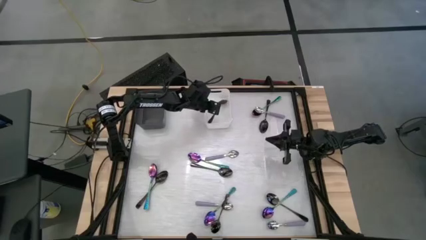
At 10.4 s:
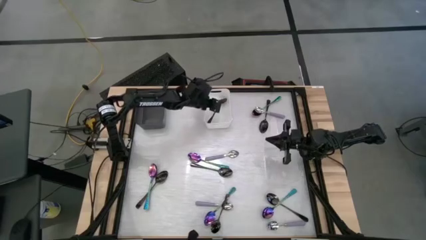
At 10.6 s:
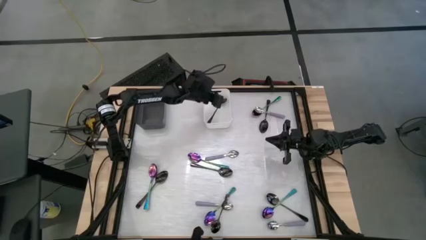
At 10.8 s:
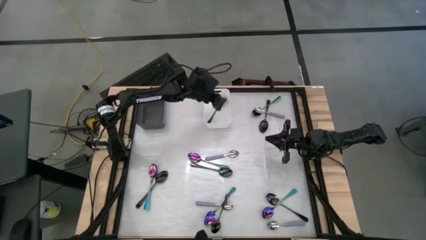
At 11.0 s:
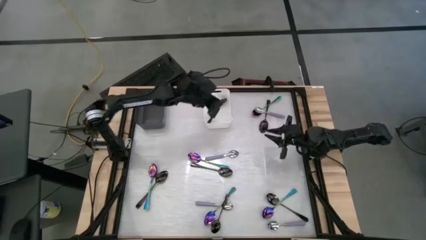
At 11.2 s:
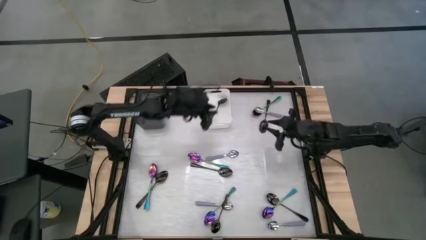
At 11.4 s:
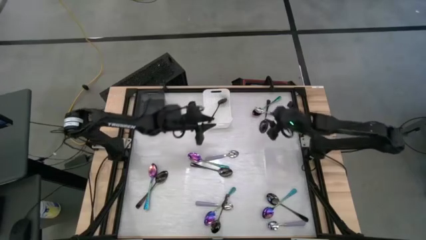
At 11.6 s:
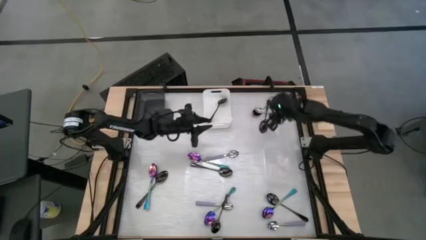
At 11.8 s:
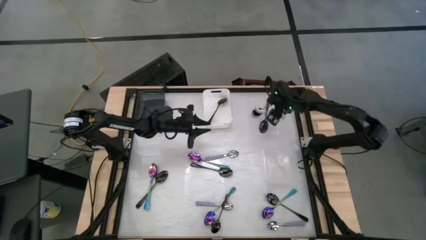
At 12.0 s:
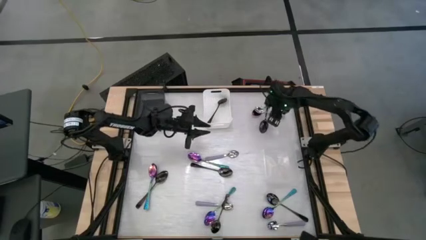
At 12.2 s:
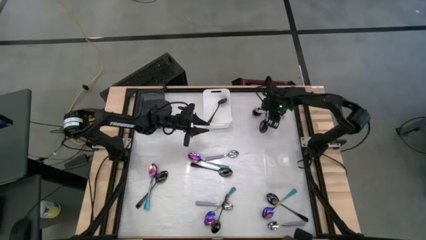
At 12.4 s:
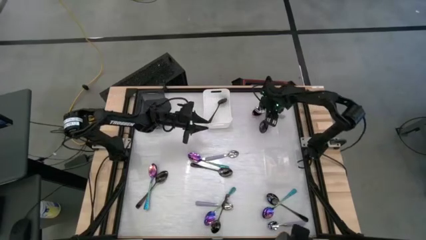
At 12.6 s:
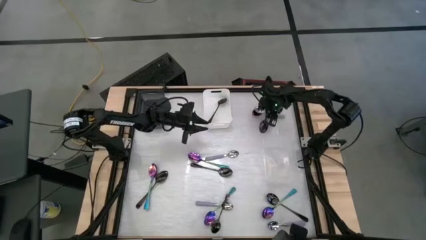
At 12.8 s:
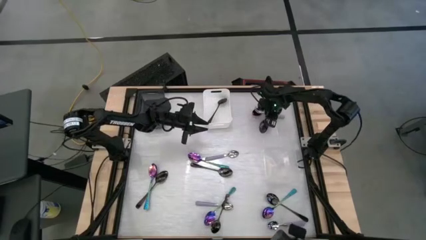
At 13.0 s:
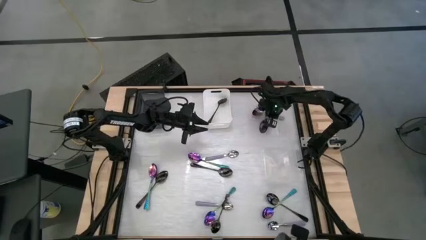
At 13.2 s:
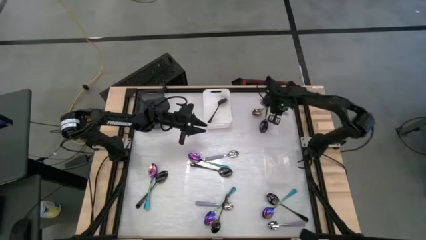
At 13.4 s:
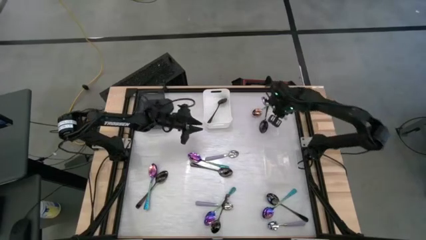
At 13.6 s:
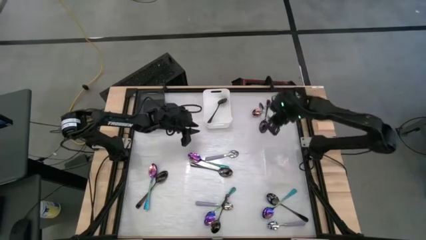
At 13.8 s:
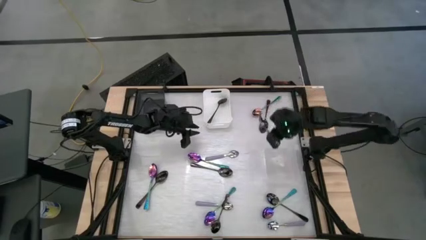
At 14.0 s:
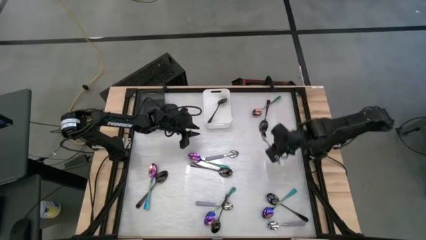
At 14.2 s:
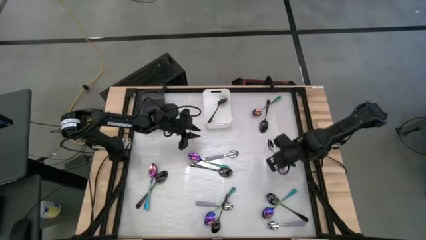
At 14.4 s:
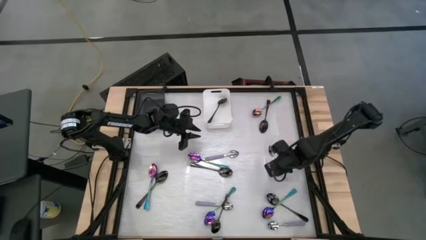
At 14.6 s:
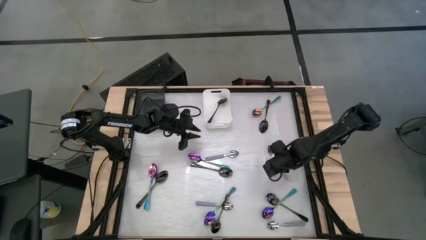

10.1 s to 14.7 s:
Task: Sort silverware by color (type)
Put the violet spoon into the transparent bin

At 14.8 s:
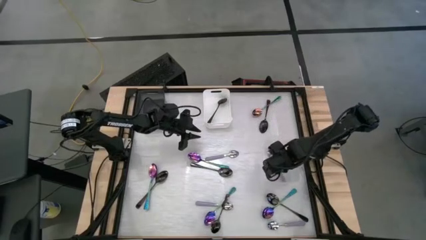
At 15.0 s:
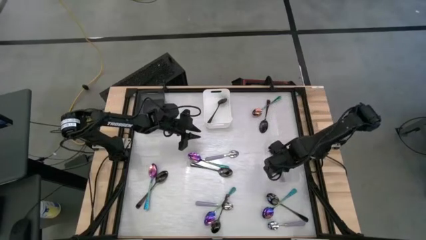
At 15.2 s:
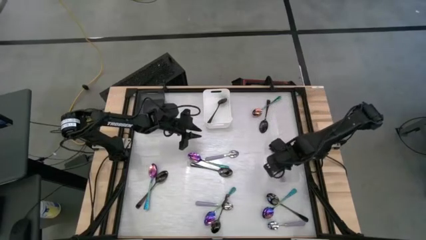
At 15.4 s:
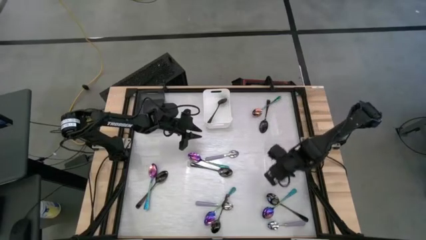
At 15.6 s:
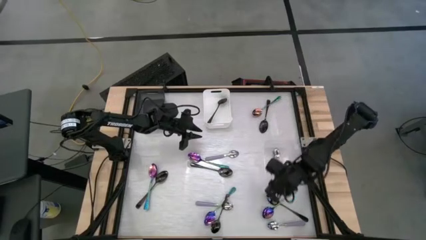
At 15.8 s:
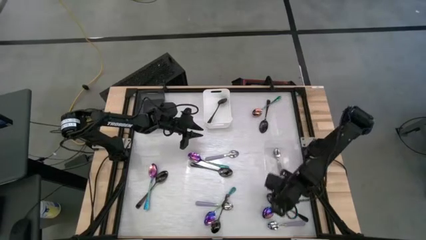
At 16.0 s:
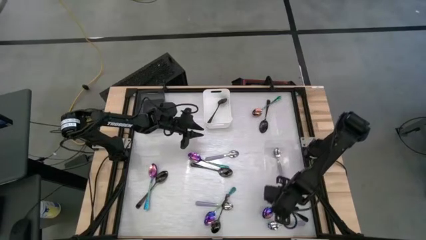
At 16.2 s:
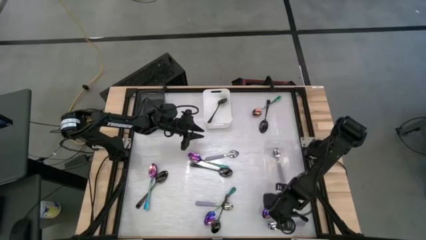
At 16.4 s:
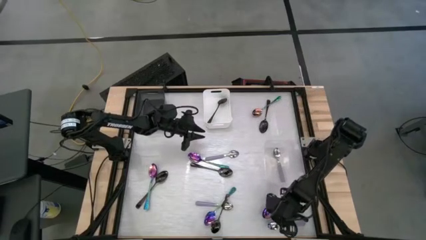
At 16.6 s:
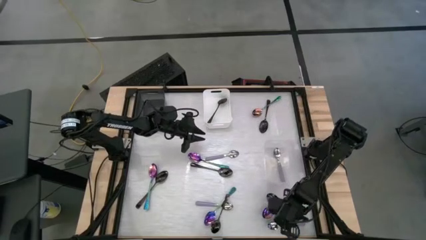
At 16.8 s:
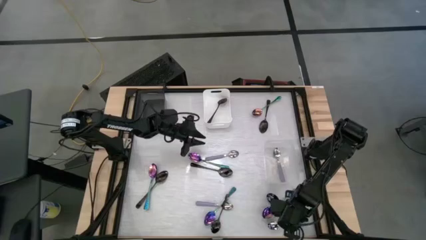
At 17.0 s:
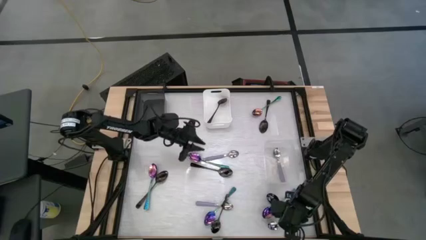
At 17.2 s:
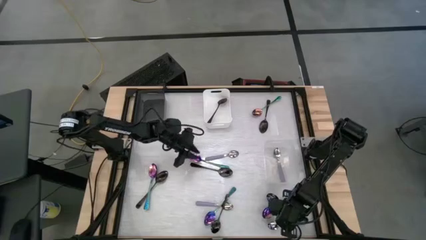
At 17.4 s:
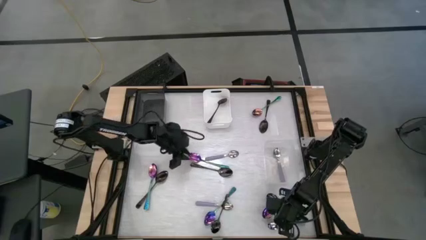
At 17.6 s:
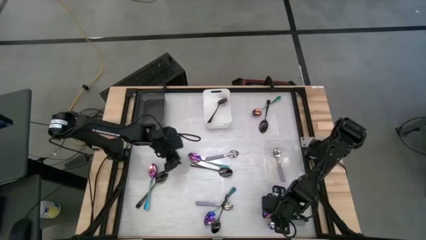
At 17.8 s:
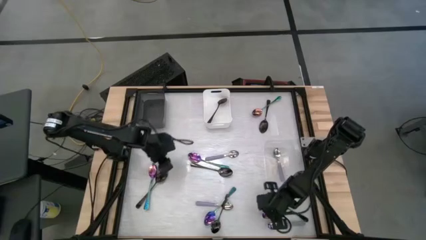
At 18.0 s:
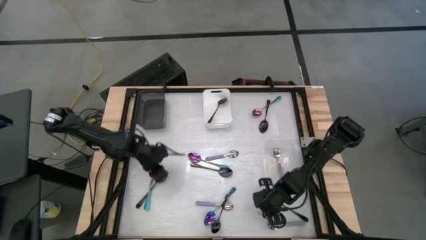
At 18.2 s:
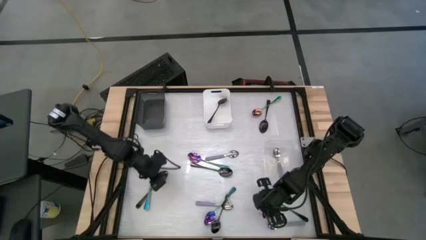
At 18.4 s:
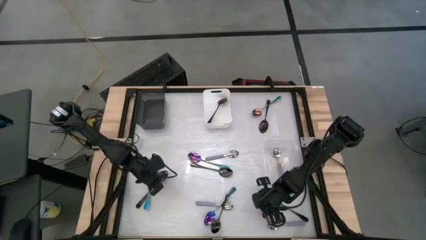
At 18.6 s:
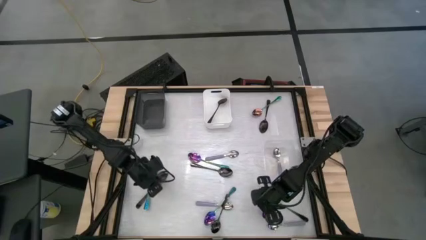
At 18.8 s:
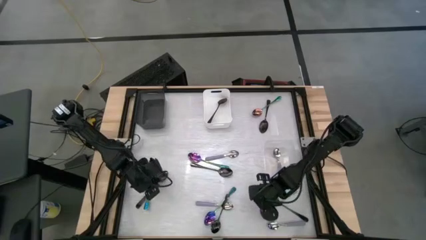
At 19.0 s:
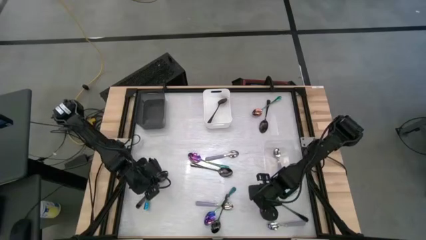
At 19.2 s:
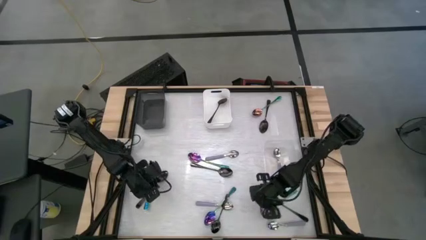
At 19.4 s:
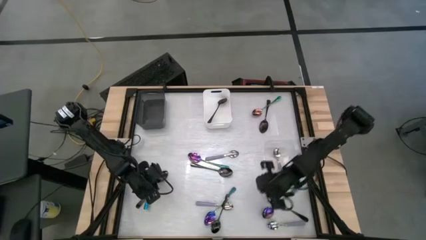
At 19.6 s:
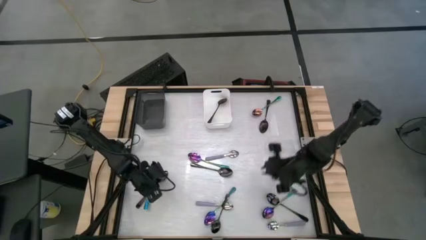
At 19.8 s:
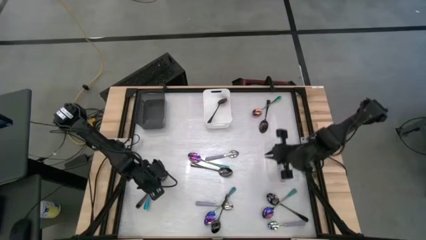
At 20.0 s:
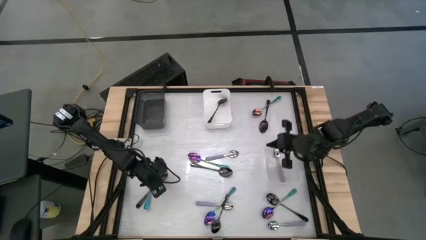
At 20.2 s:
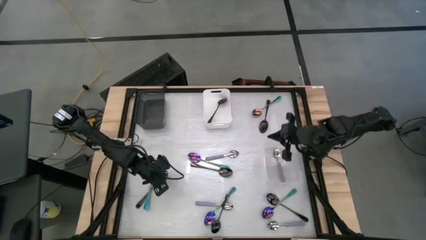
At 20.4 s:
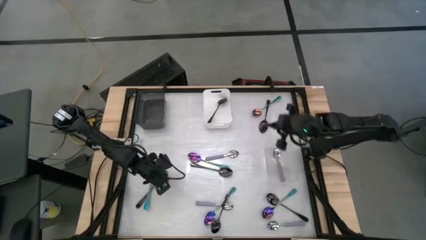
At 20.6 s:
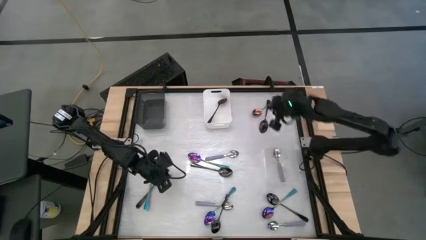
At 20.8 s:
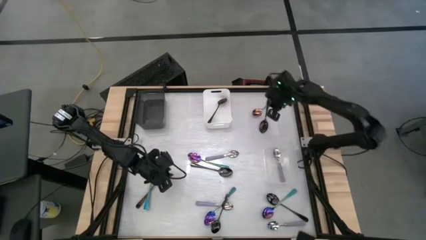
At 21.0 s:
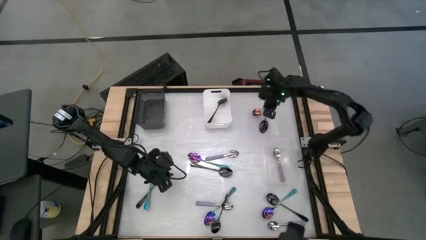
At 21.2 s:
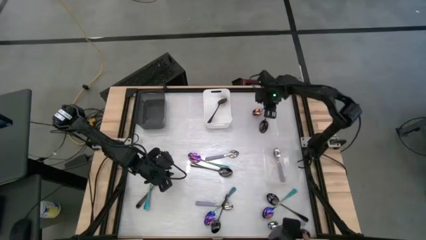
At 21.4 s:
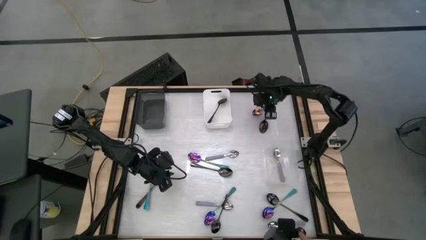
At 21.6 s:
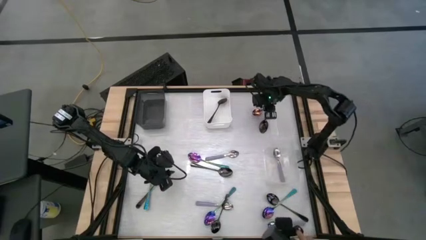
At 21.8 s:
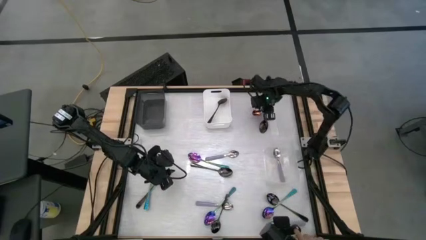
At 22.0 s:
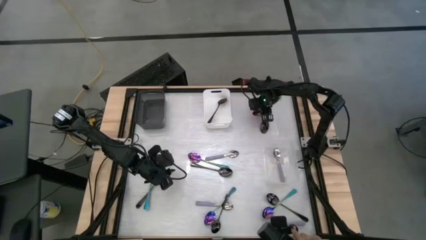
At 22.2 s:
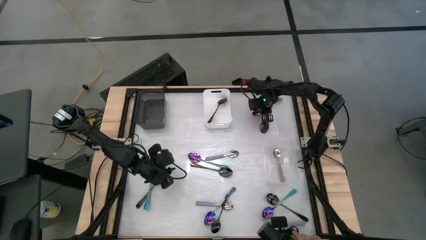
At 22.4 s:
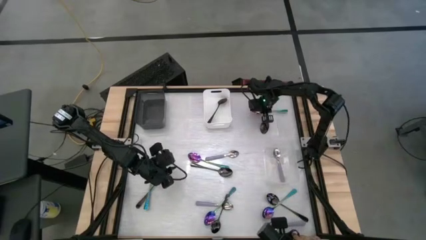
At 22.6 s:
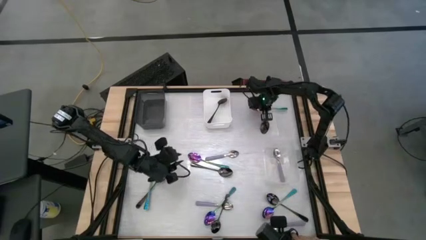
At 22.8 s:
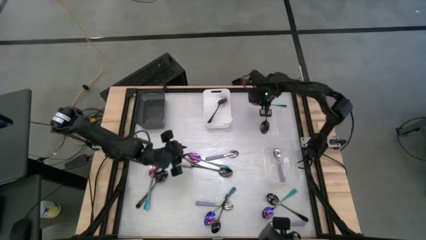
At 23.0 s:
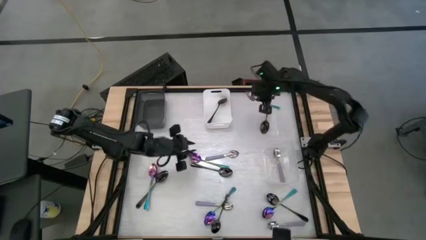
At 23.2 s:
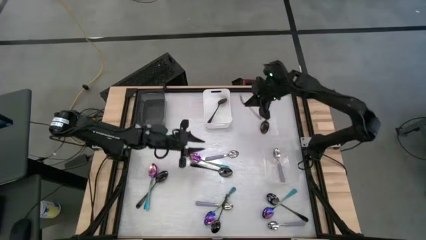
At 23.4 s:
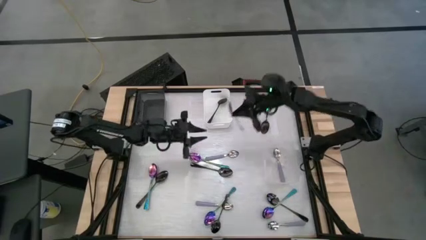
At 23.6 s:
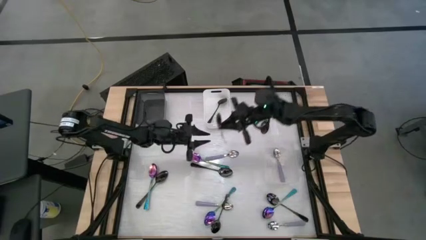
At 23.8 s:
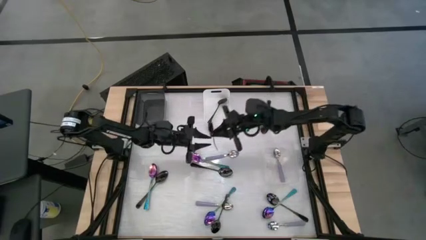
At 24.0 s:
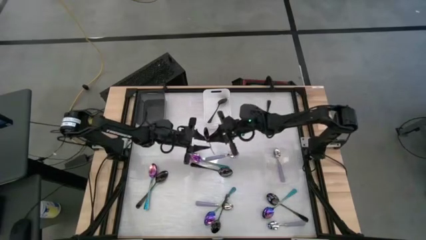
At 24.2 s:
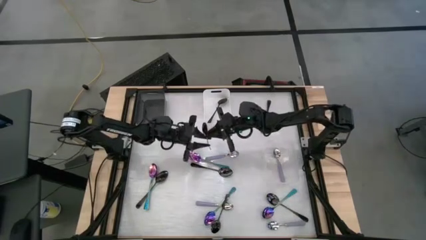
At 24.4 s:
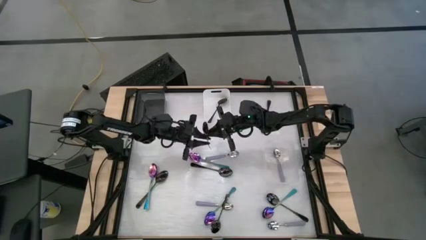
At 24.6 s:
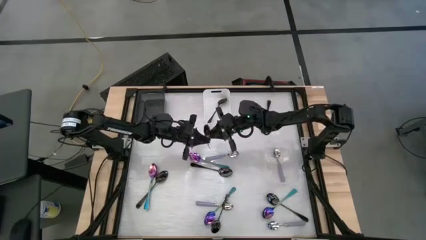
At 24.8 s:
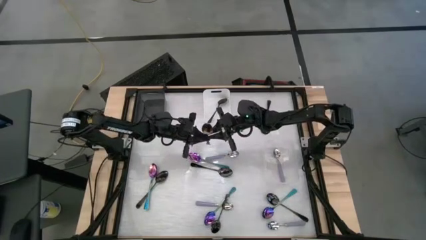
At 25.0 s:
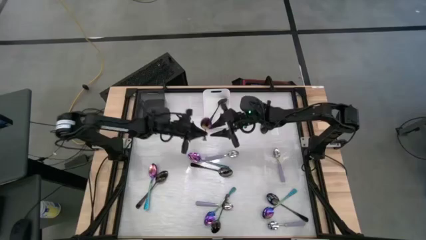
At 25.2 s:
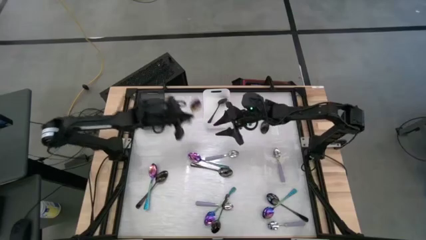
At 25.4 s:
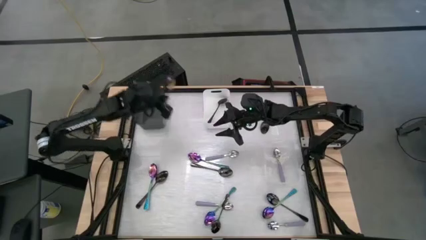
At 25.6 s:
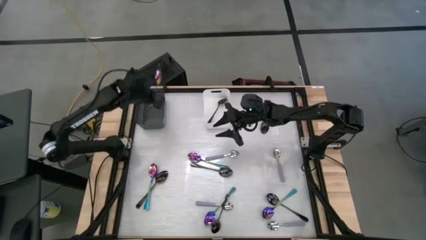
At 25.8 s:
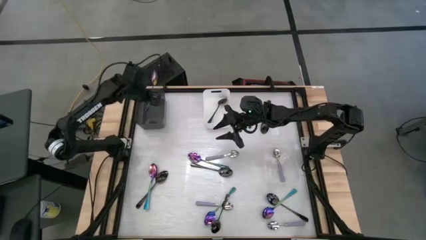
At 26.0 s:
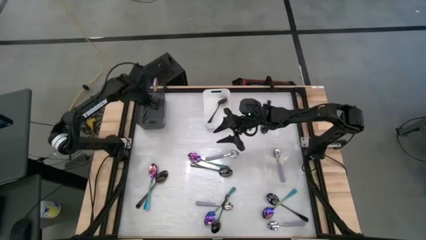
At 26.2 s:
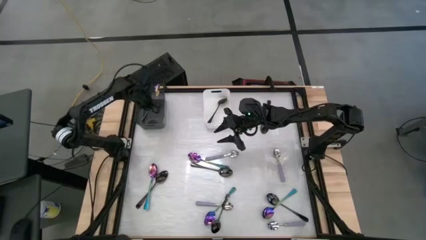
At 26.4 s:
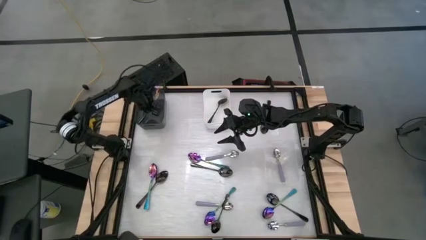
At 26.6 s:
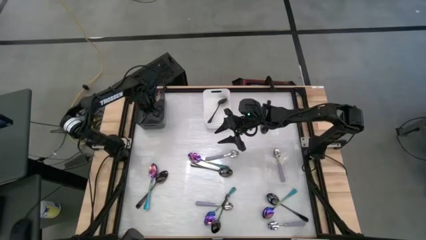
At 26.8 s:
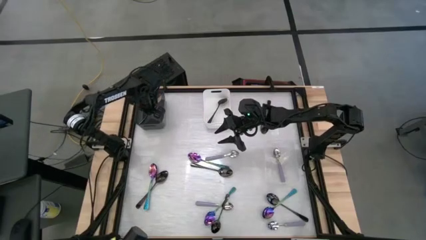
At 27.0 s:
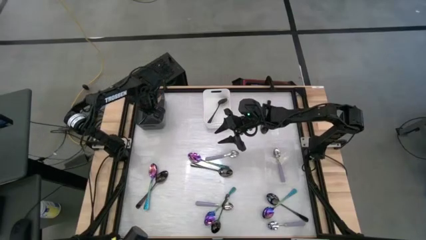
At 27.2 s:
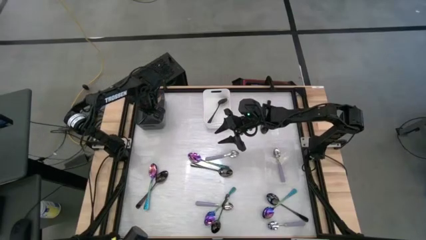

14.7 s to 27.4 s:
Put the blue spoon into the black bin
